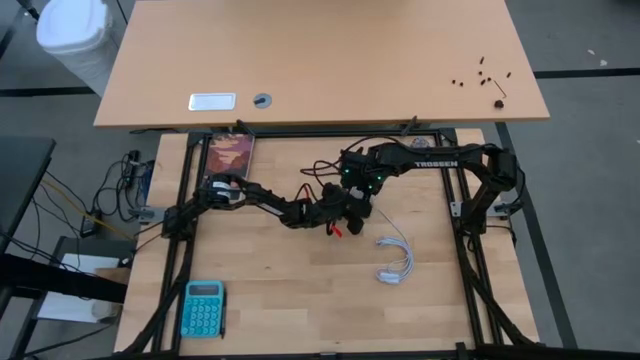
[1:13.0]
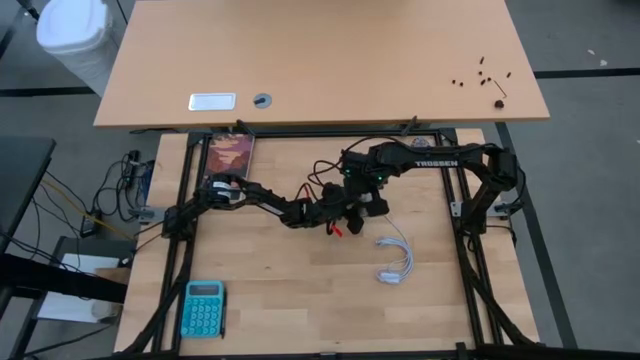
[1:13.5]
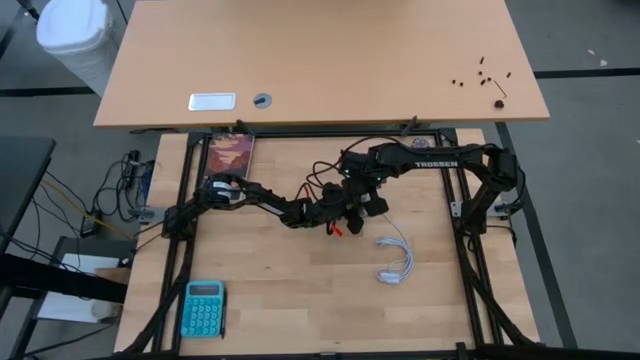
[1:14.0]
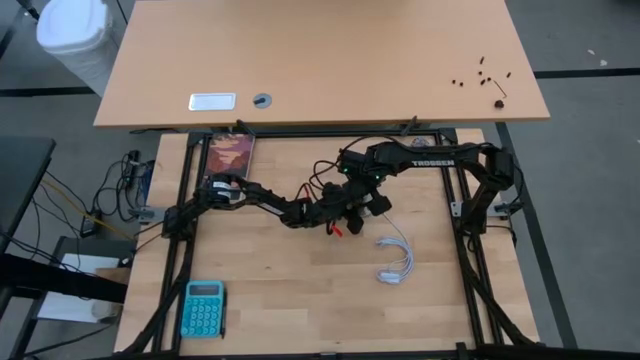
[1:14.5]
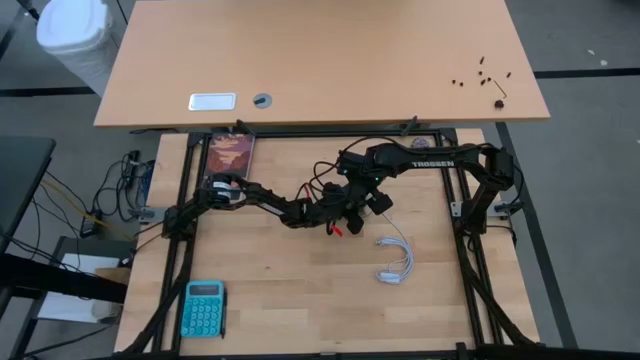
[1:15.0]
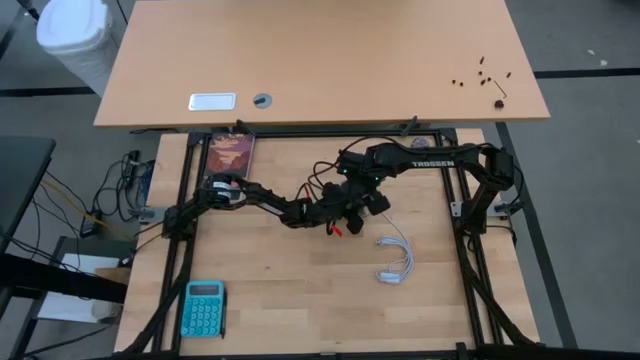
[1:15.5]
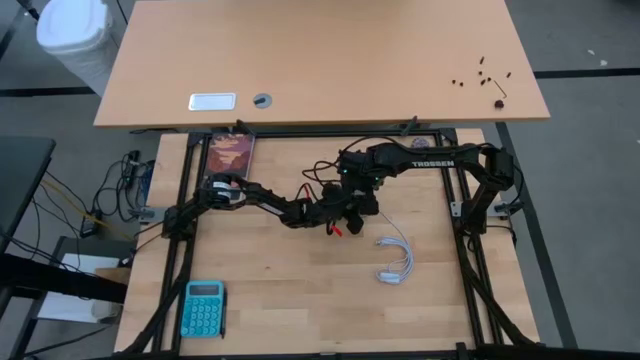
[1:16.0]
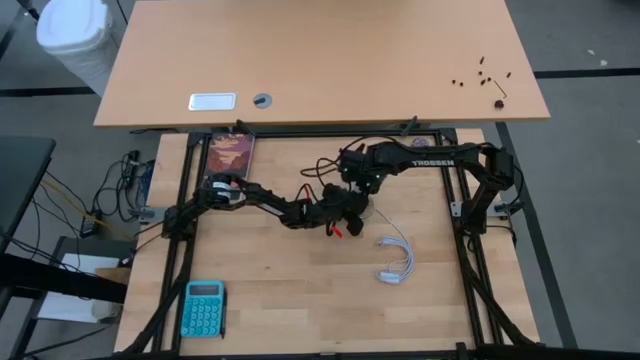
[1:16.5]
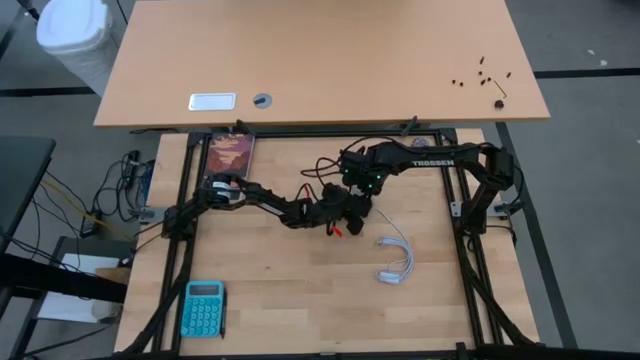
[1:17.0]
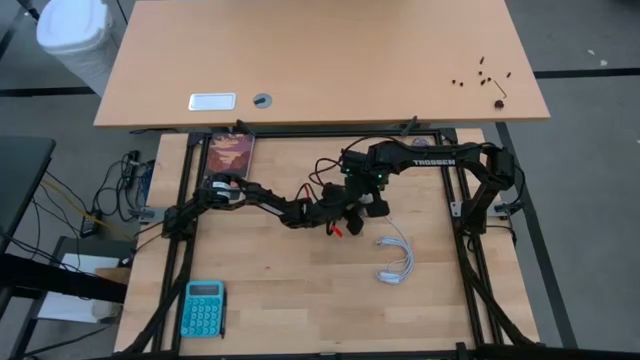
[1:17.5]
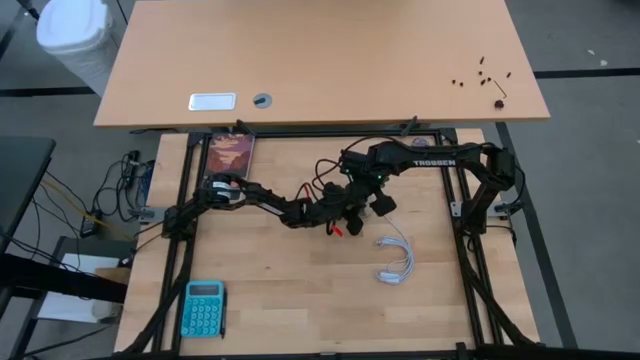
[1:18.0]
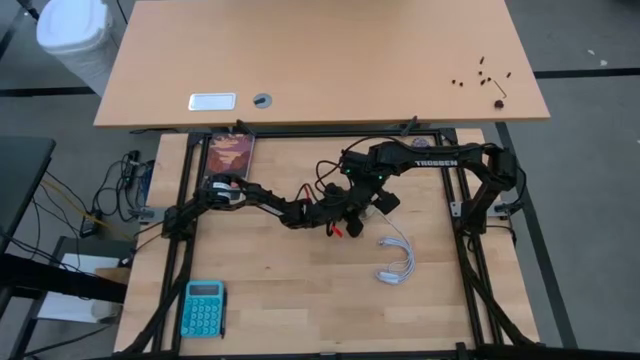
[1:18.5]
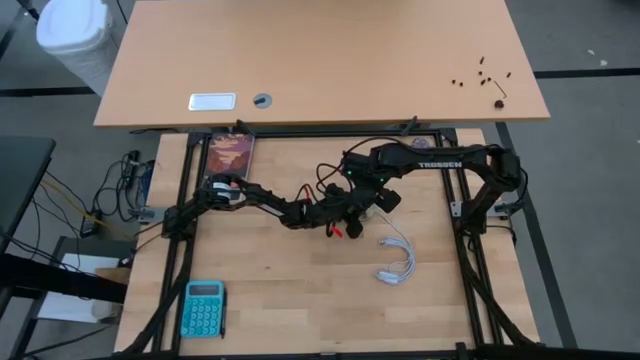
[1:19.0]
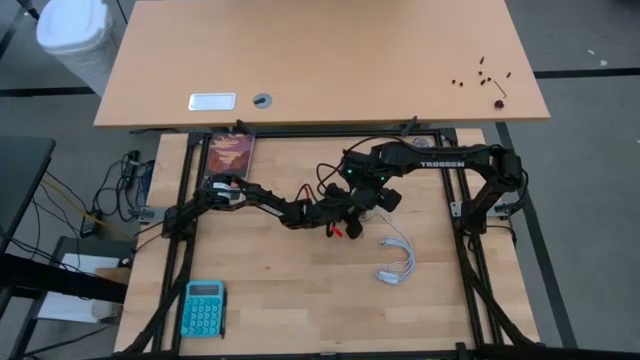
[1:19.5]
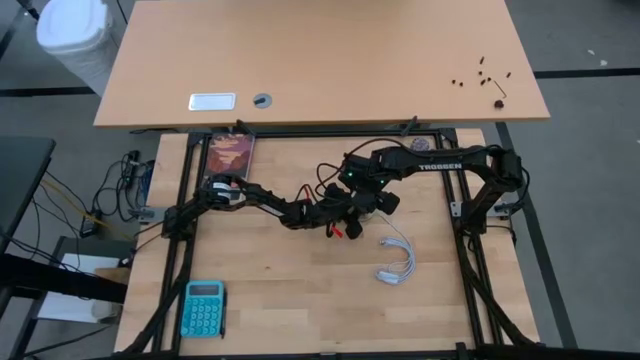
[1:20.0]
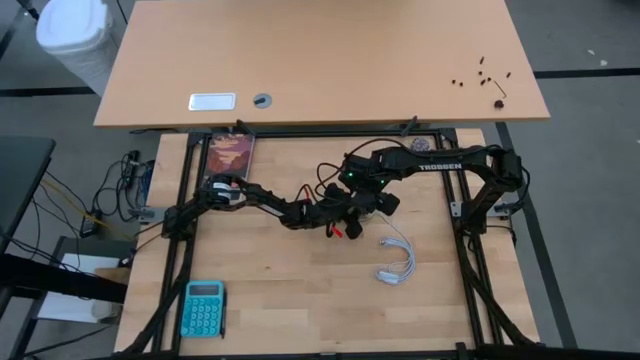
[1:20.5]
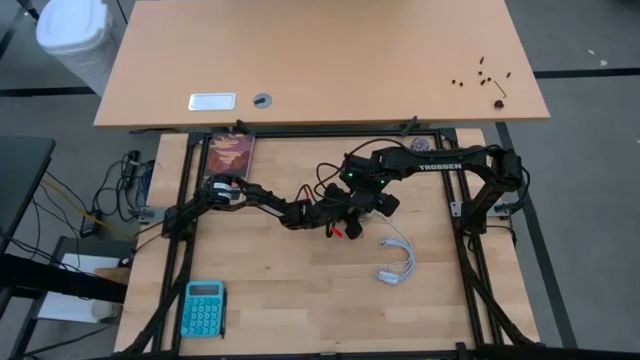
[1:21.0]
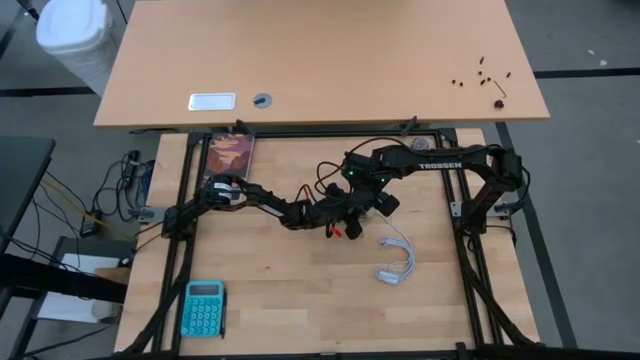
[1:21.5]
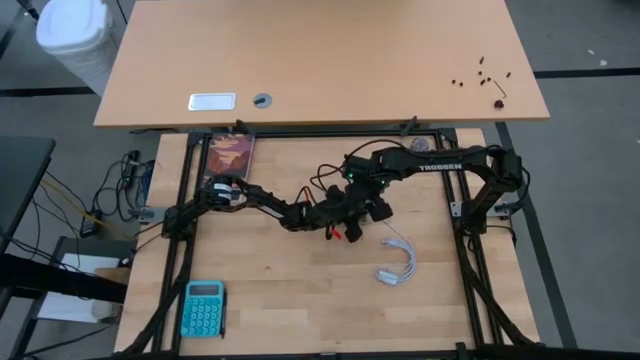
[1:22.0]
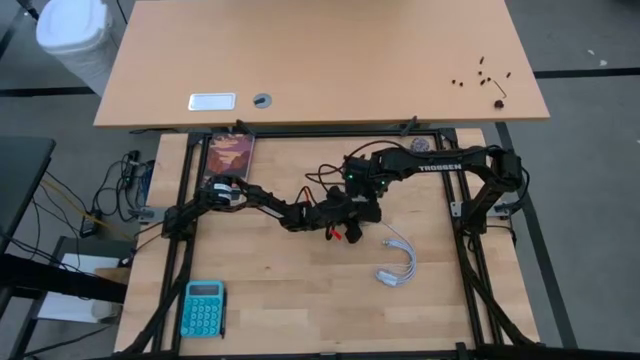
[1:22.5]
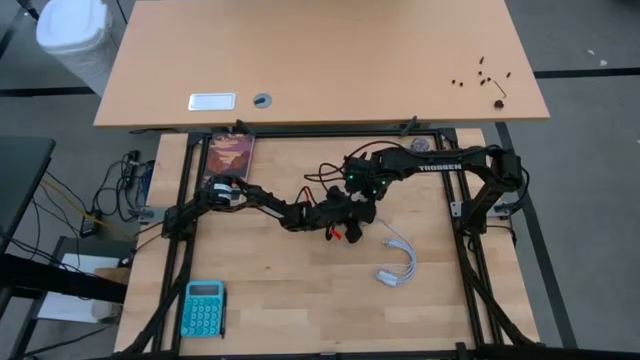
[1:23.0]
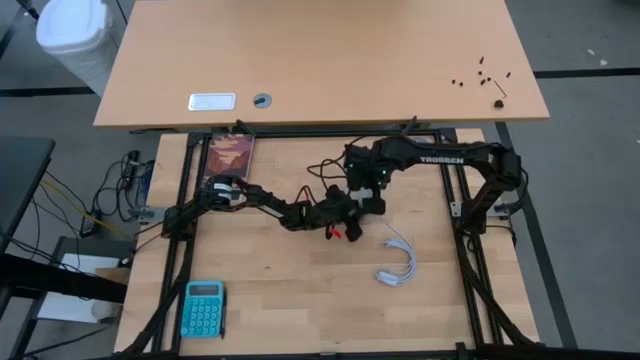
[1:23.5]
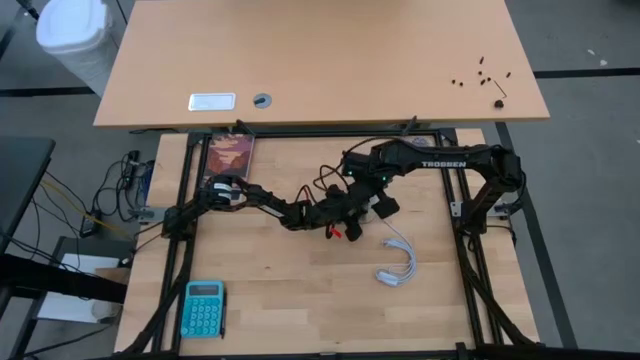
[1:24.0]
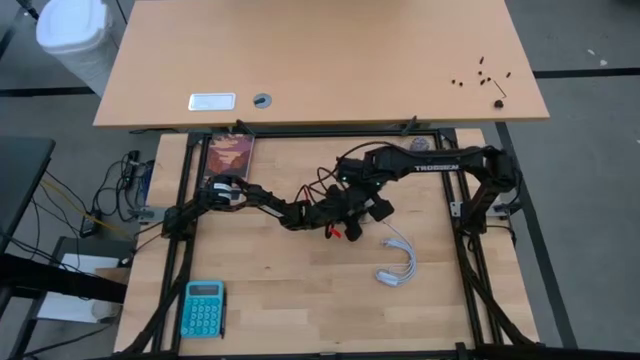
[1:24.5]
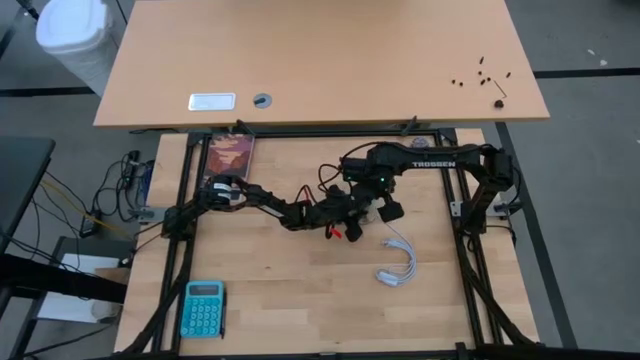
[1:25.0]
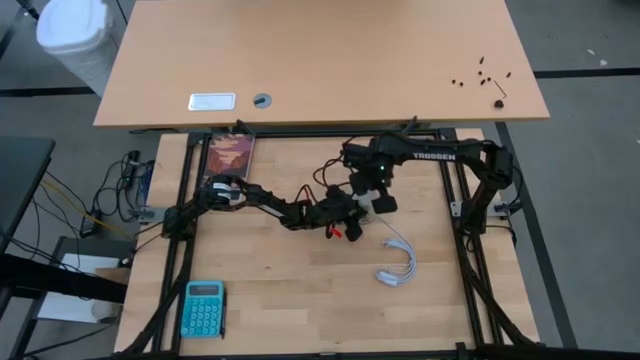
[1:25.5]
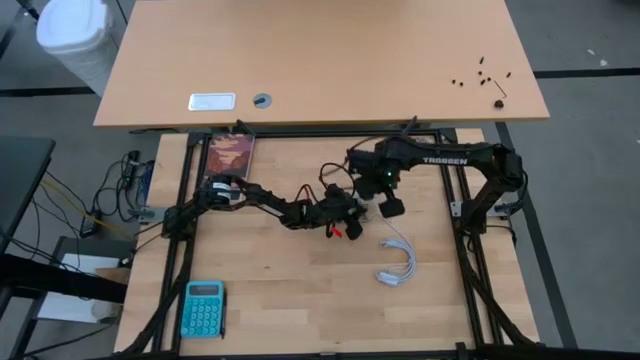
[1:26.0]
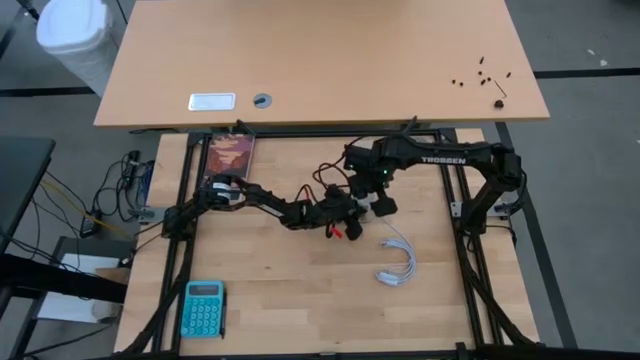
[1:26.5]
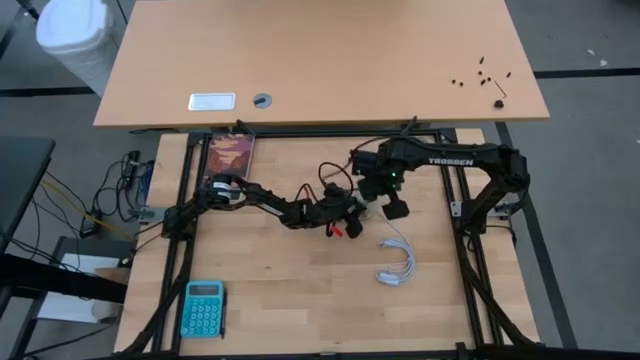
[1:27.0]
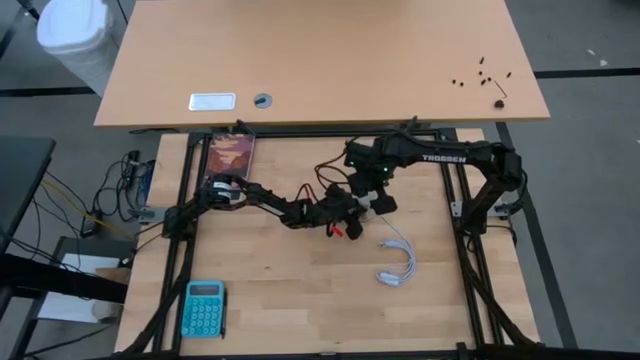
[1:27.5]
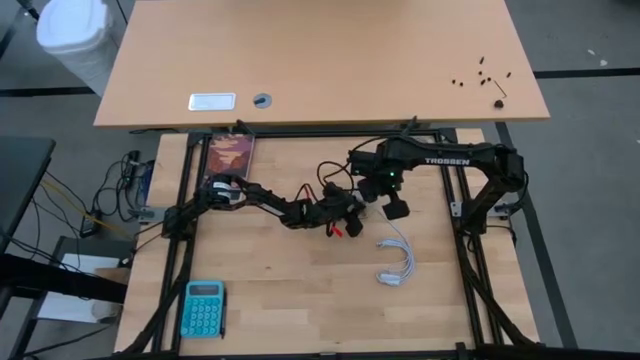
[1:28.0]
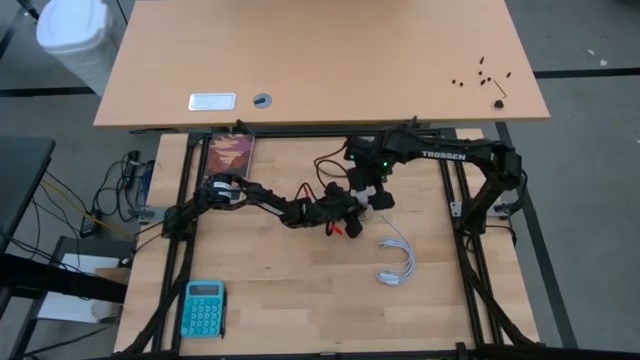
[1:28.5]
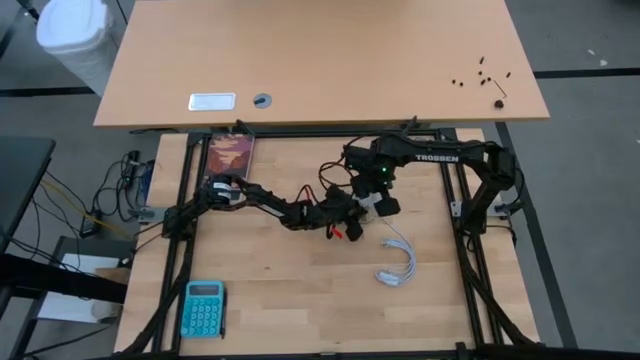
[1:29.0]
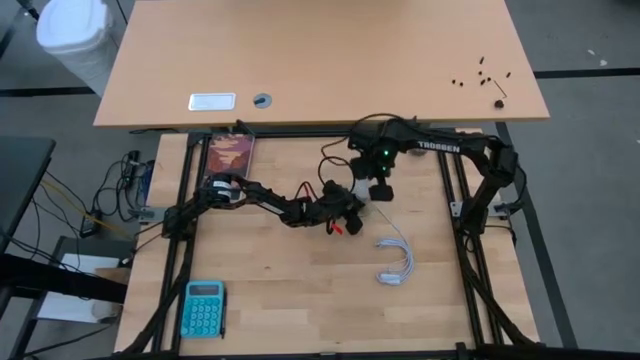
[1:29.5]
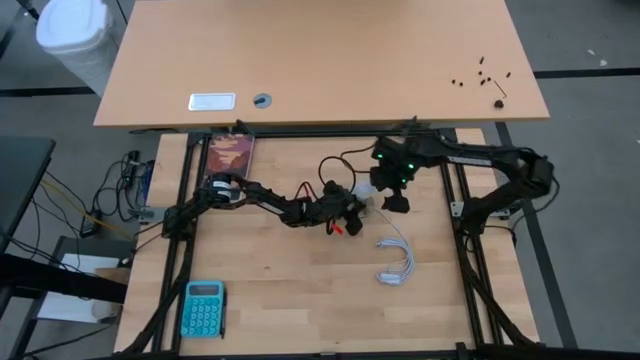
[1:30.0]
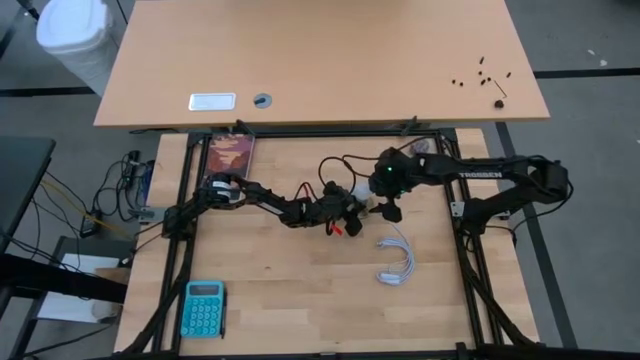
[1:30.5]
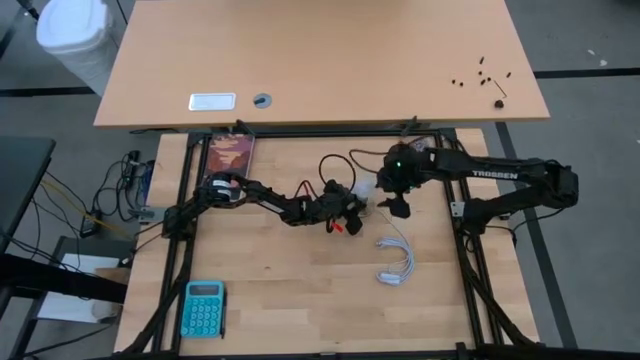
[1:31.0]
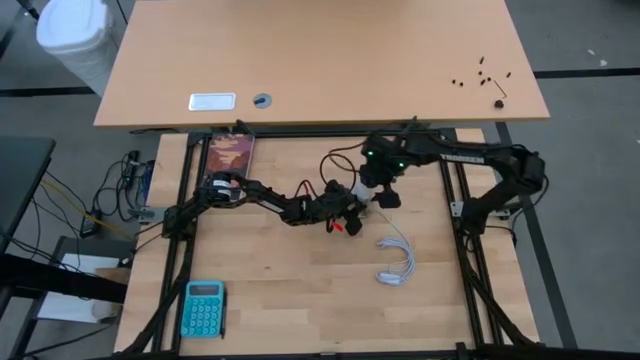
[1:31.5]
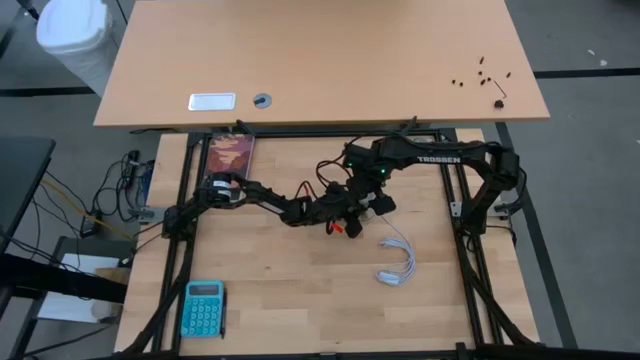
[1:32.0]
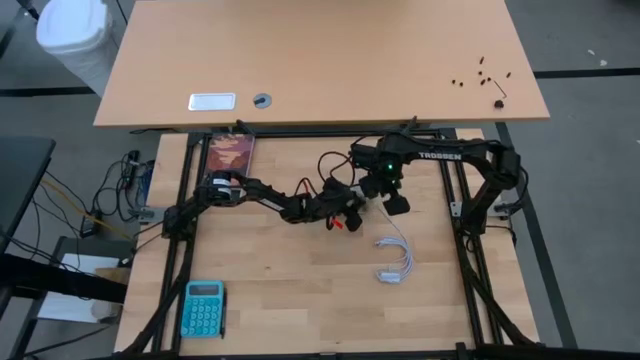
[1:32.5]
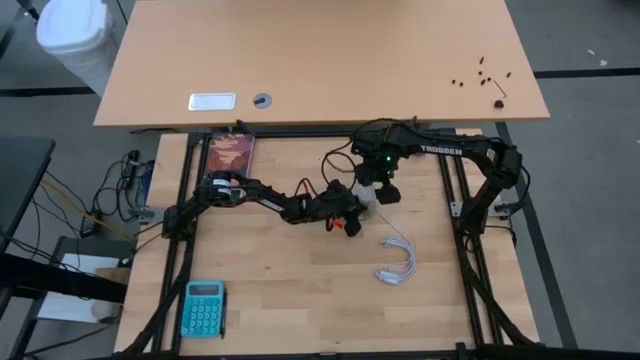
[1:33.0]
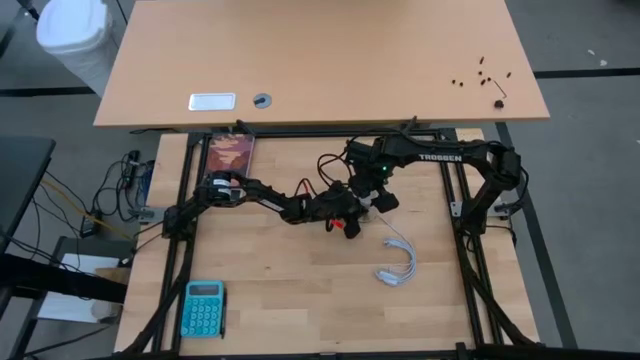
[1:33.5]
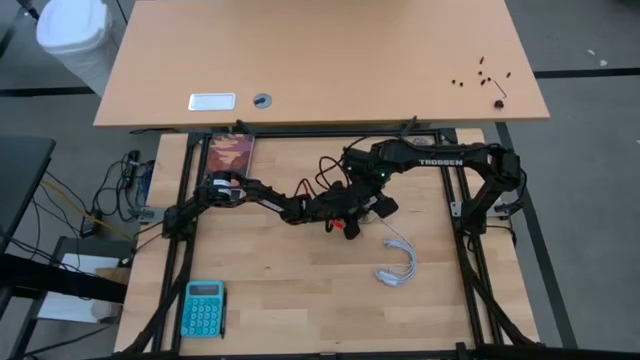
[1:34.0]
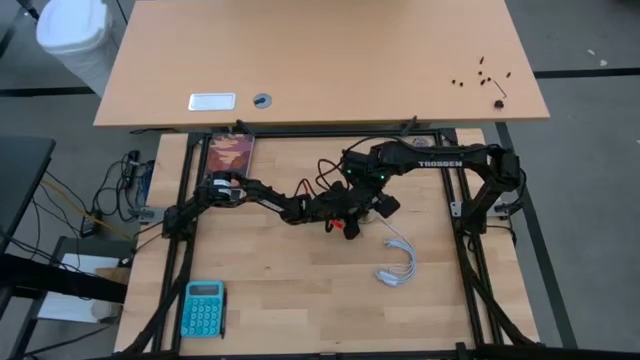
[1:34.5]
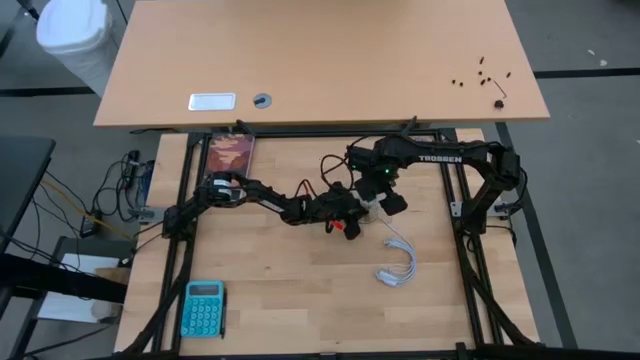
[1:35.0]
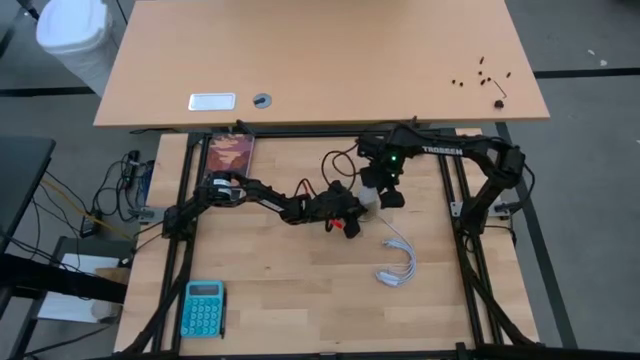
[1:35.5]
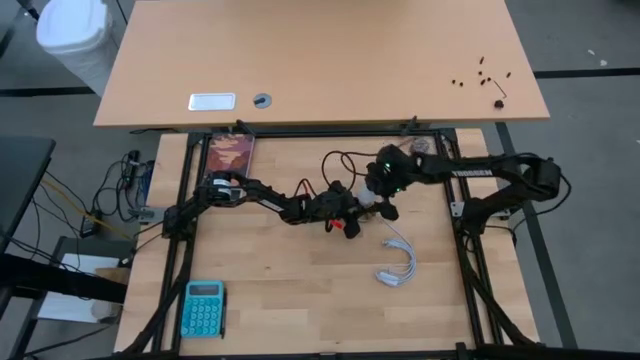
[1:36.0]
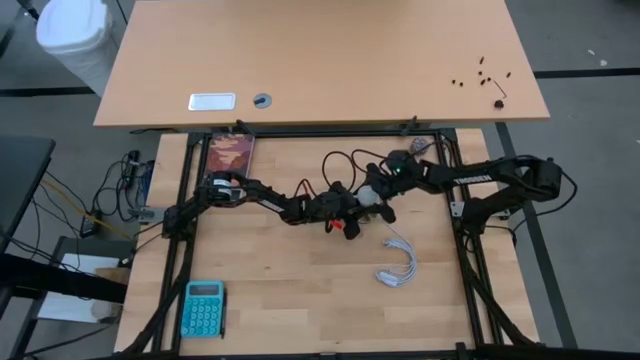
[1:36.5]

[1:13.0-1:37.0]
Task: Screw lightbulb
Insert the white lightbulb into the lamp
